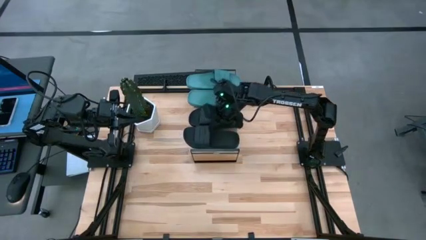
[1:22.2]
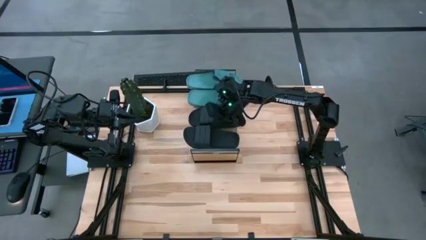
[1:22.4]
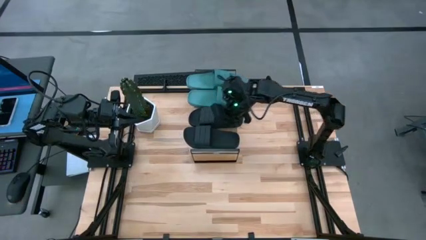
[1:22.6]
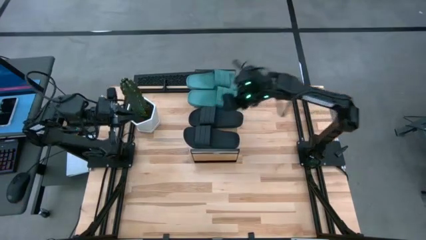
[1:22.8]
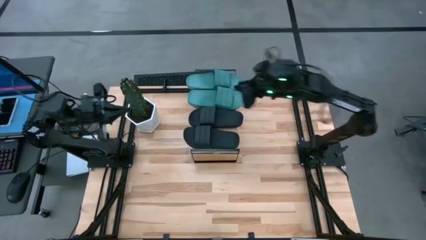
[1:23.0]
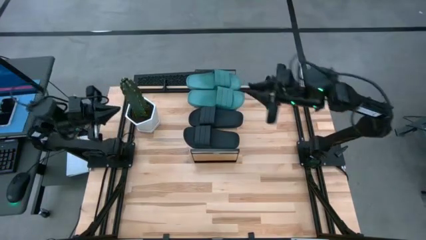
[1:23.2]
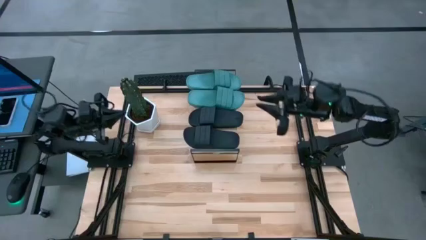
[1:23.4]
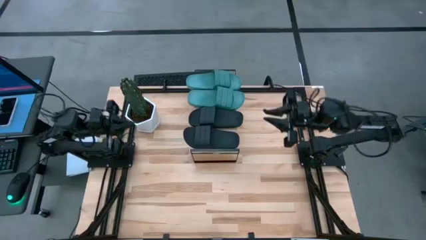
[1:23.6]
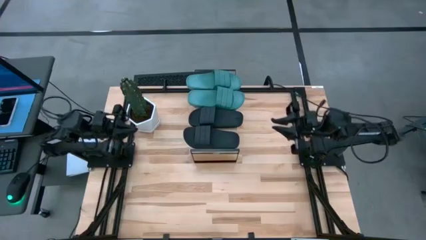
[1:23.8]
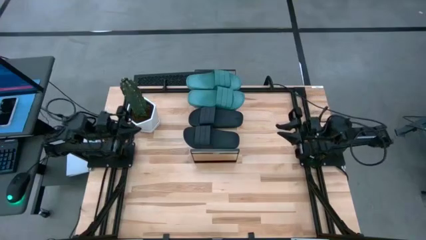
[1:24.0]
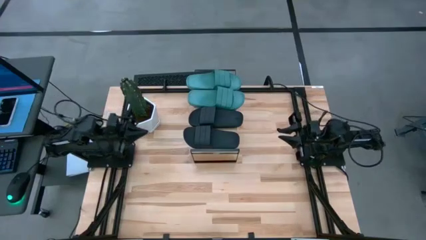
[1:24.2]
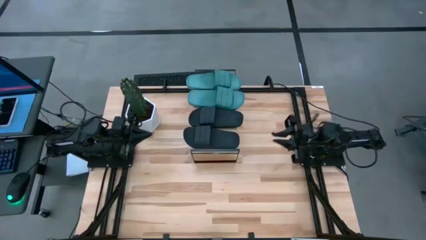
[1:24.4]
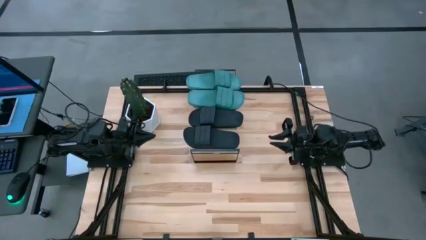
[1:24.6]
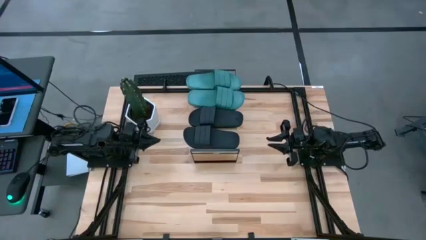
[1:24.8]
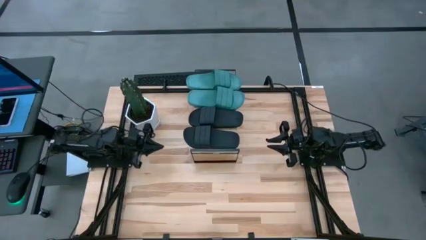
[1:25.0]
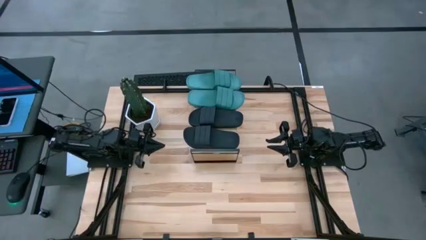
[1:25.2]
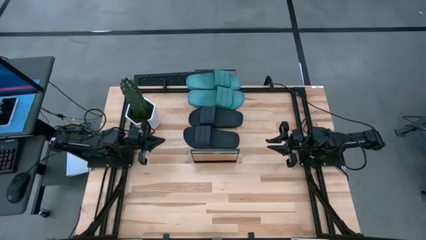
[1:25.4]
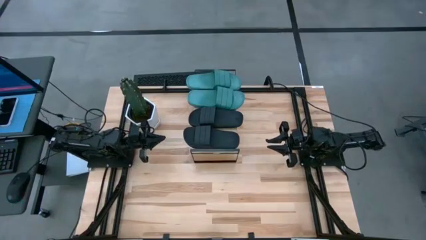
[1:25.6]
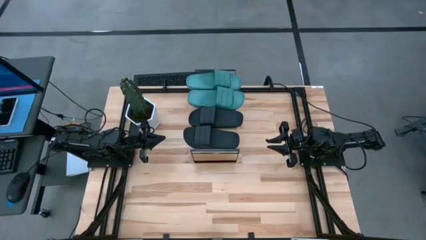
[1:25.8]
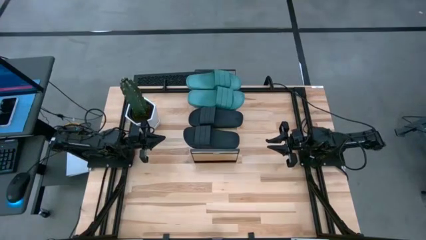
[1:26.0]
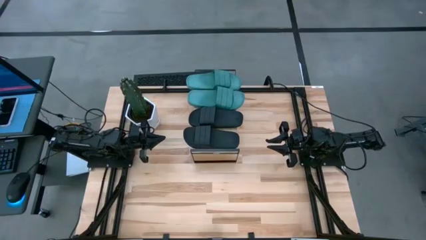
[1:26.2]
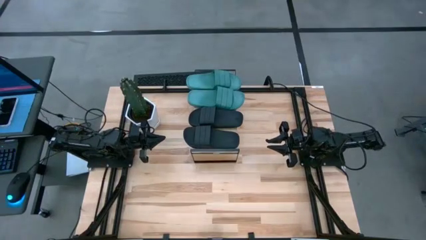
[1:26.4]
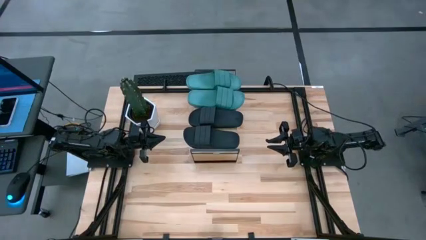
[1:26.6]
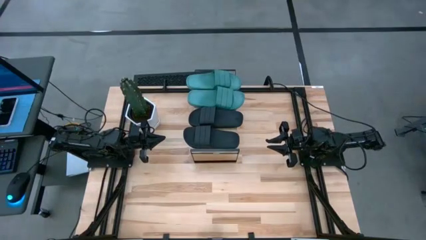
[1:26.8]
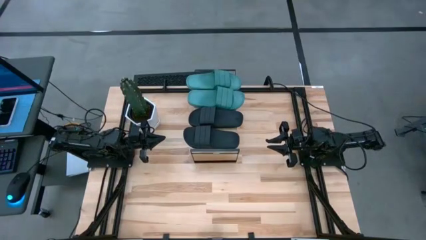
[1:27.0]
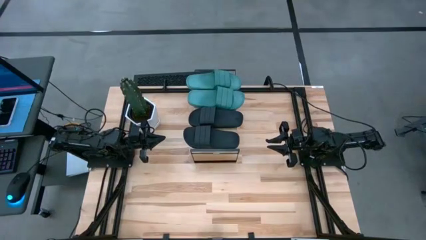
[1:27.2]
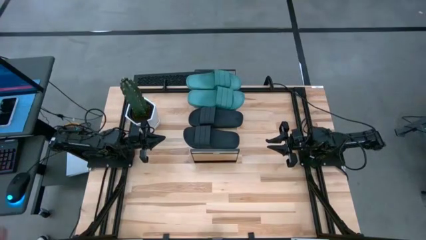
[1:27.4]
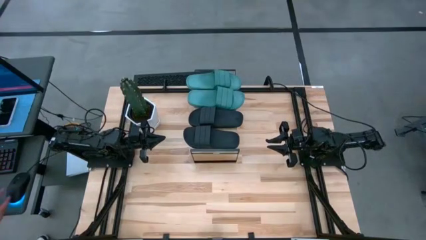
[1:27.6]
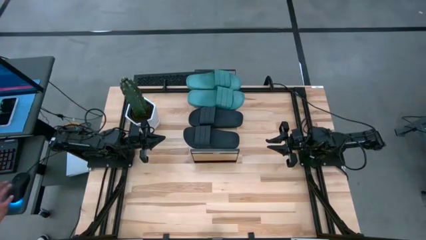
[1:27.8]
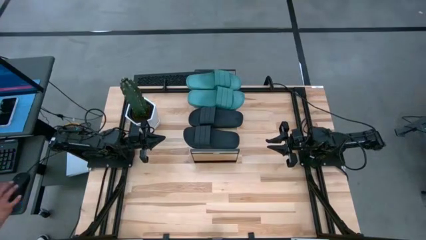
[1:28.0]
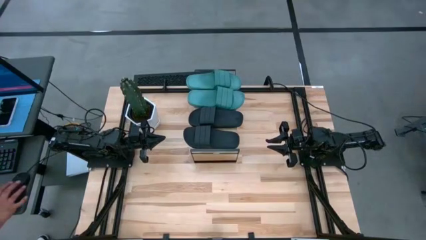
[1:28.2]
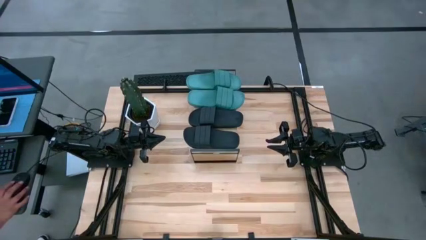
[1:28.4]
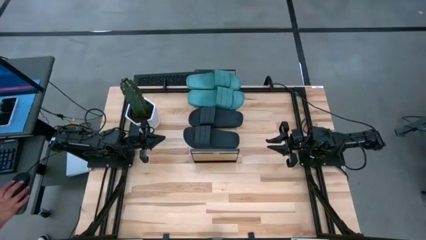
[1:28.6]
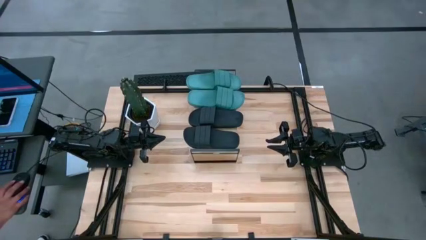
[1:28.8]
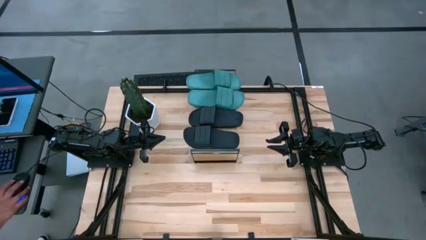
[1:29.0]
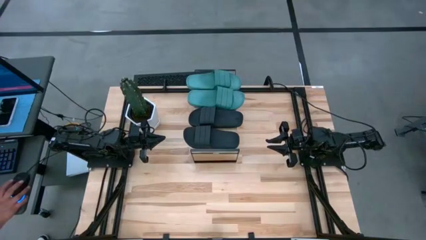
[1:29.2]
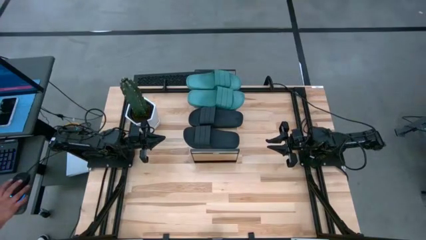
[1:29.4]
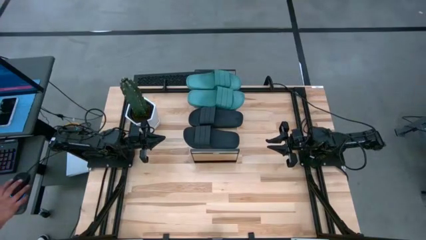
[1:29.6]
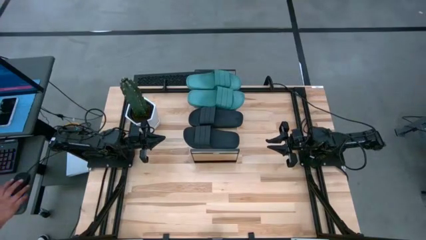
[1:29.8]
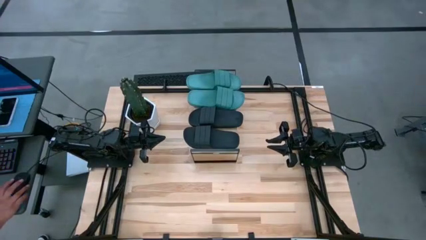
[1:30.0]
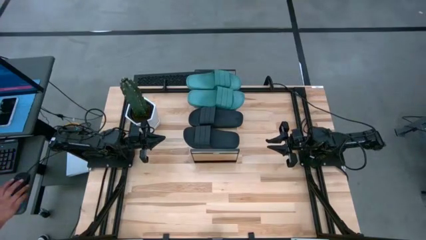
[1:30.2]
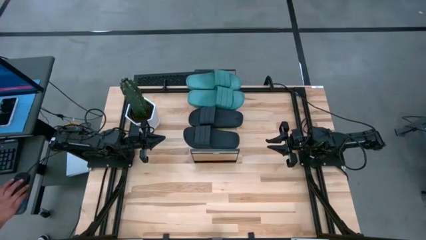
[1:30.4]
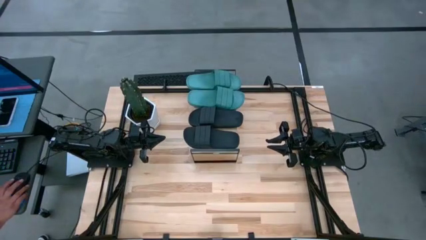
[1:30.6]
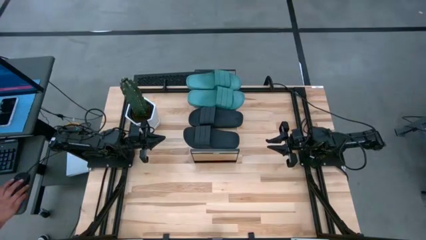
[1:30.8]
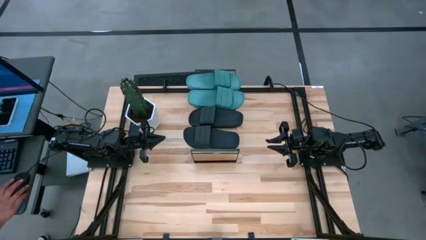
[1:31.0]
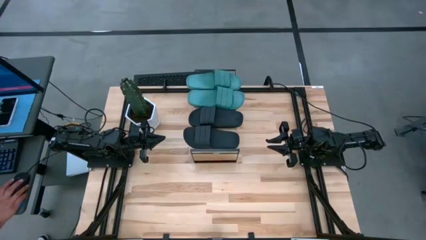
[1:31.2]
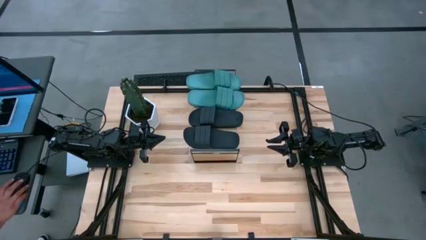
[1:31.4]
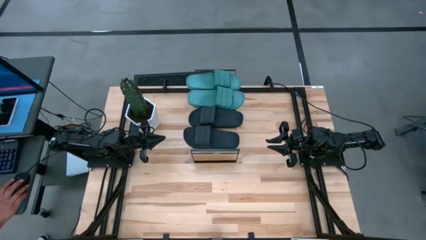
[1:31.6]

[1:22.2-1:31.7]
Task: Pick and place slides into the shelf
Return to Home Position

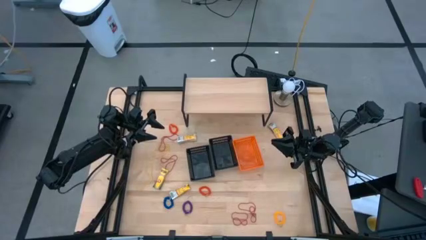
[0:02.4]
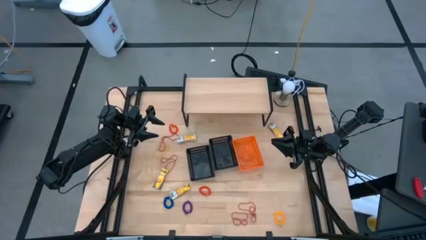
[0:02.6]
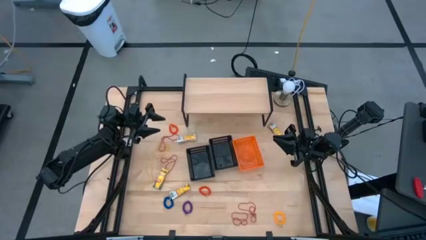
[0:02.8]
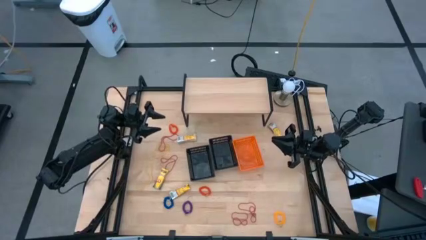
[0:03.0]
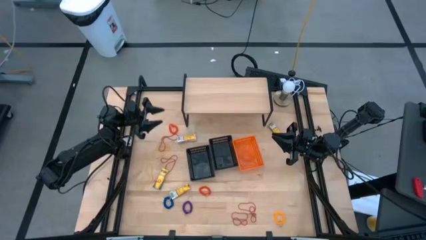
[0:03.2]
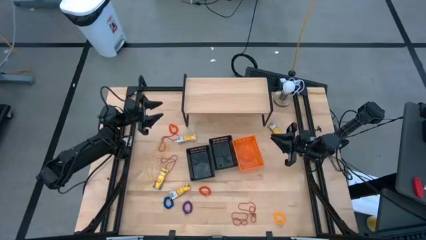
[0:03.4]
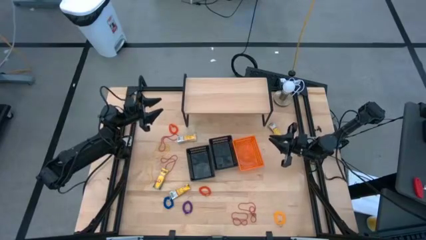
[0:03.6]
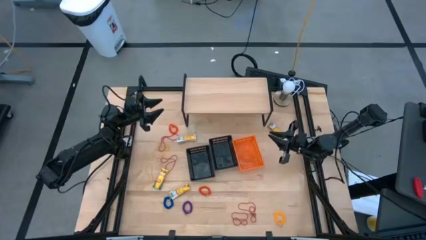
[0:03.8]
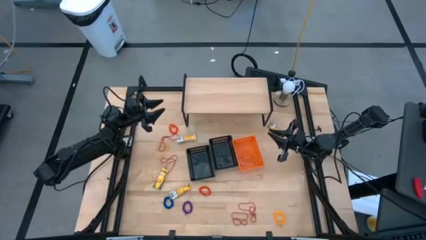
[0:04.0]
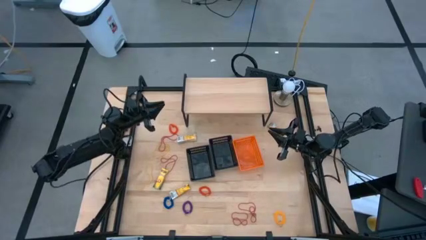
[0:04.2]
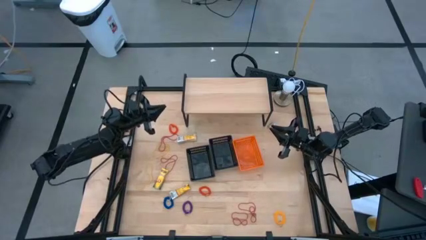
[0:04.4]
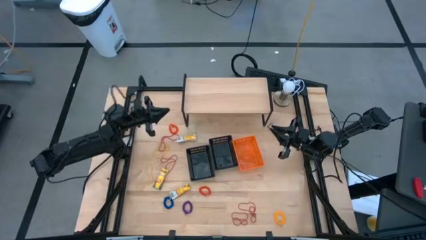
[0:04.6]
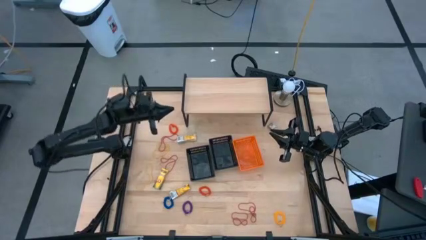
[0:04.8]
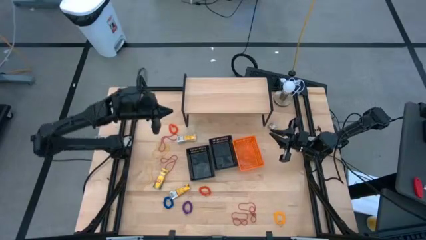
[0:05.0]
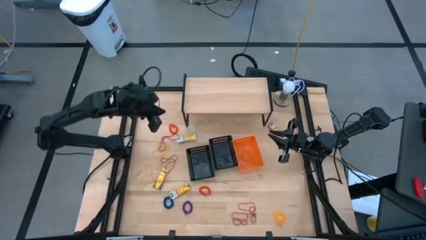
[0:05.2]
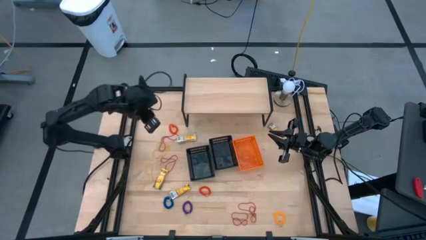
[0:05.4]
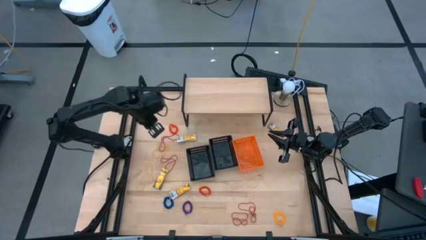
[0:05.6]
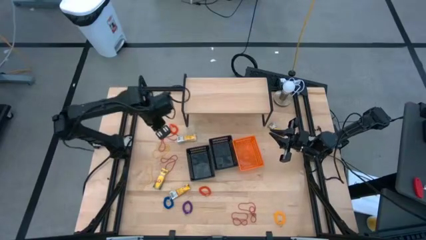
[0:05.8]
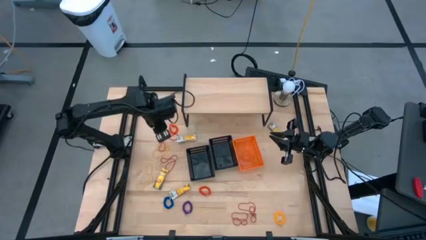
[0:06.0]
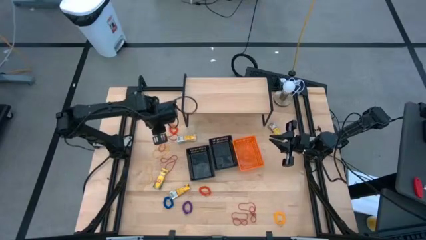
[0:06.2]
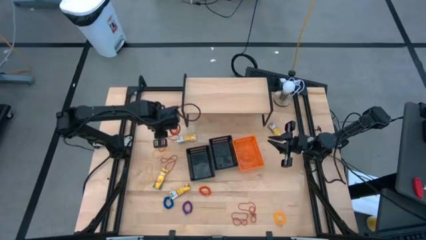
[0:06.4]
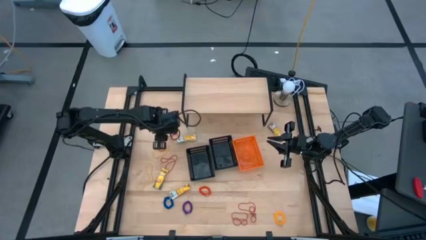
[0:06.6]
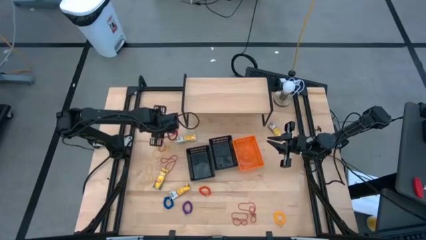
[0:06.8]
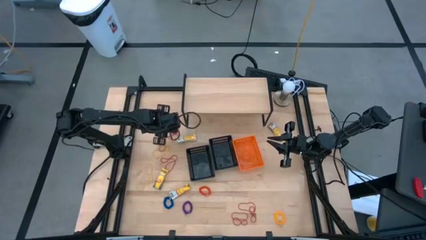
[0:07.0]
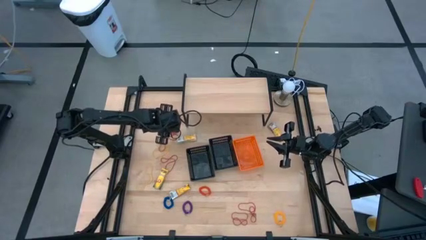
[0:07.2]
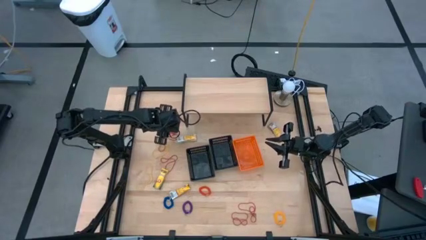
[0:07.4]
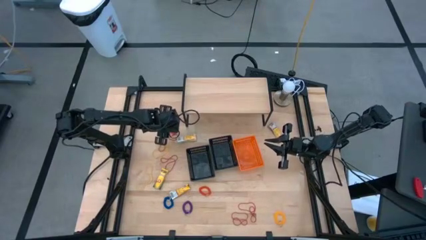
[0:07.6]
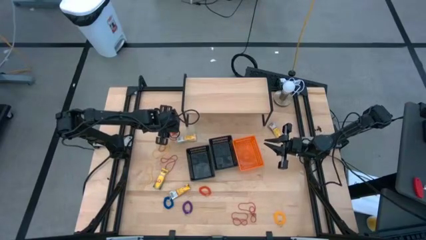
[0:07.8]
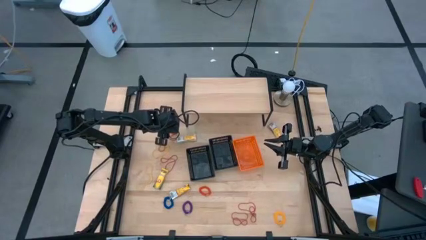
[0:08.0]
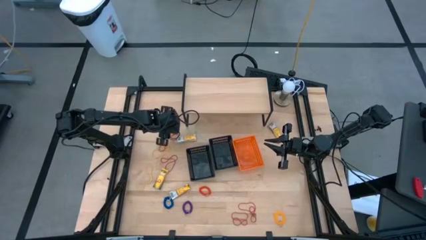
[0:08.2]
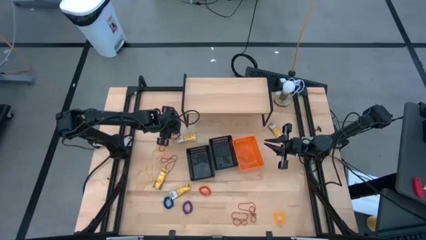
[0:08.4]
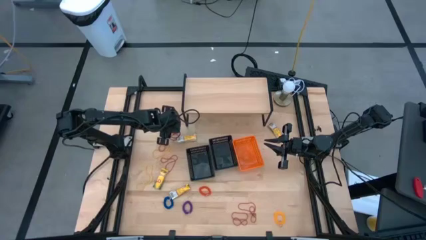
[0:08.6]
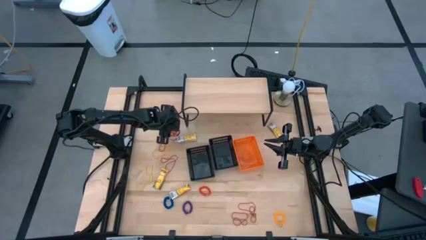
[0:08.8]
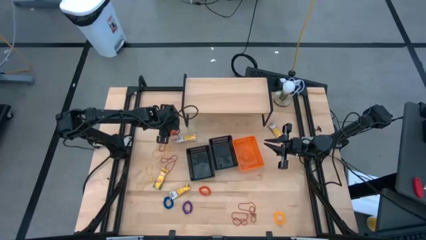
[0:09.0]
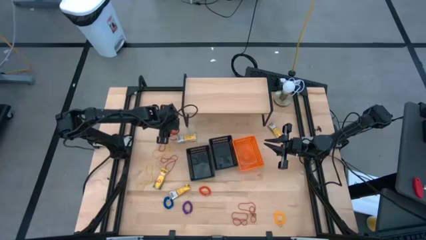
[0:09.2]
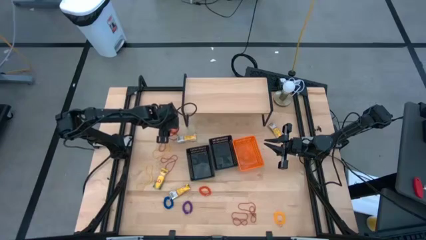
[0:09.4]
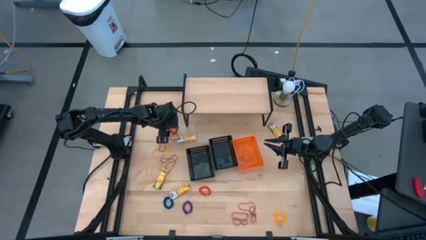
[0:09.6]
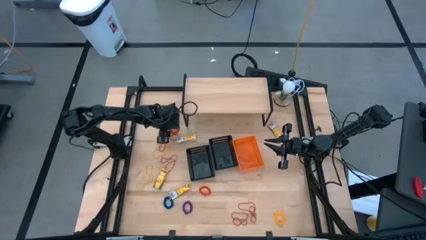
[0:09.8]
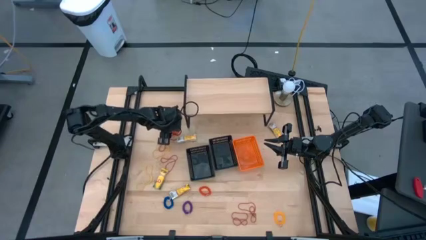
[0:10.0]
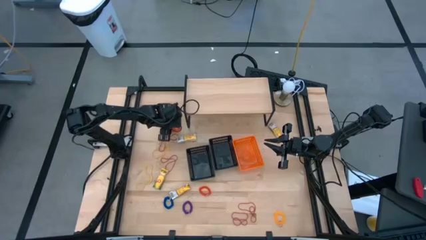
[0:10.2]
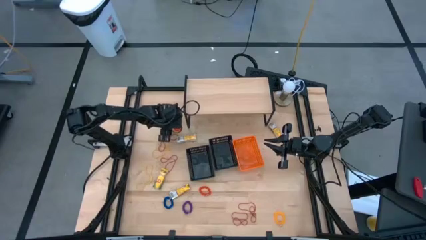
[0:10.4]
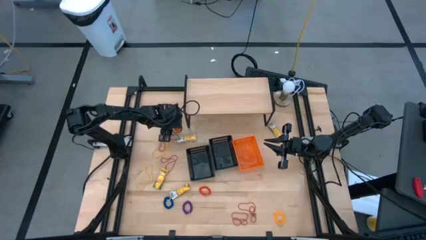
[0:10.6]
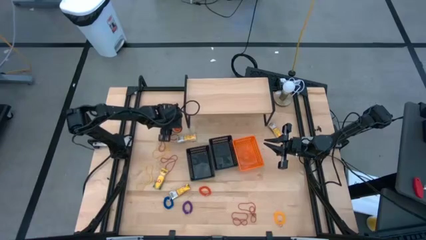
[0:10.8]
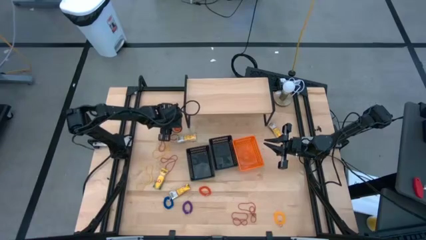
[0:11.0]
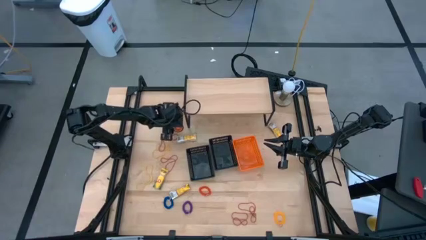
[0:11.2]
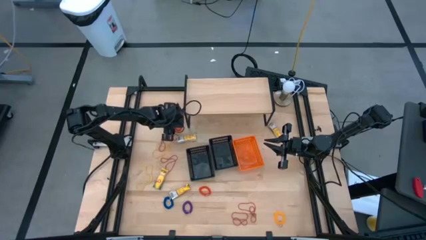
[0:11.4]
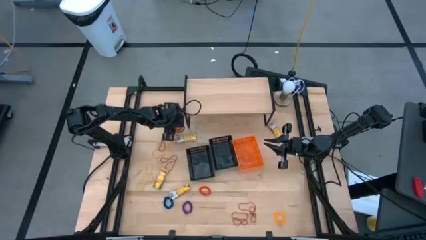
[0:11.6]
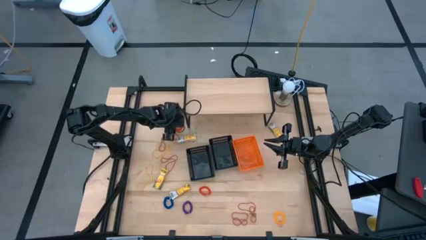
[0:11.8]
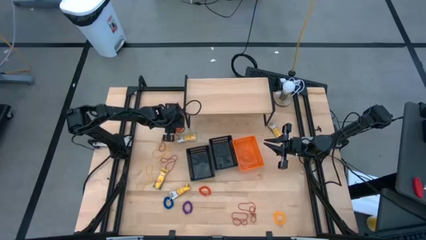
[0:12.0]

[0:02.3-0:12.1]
Task: Pick & Place Office Desk Supplies
Put the top orange spiral keychain into the left black bin
